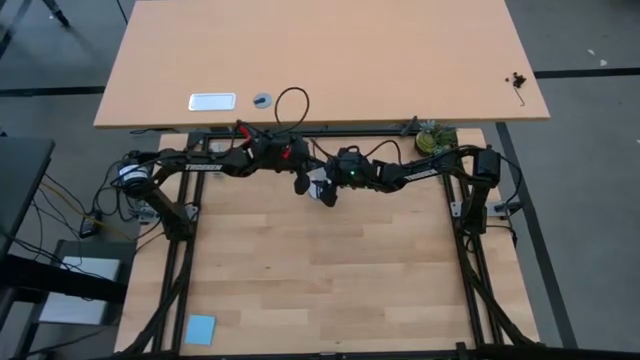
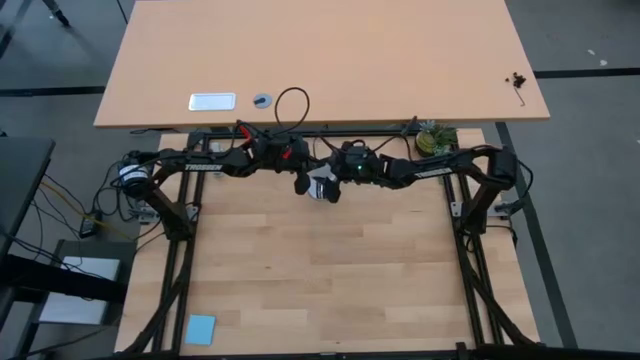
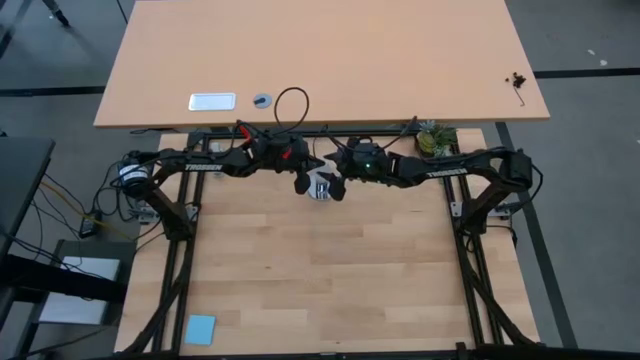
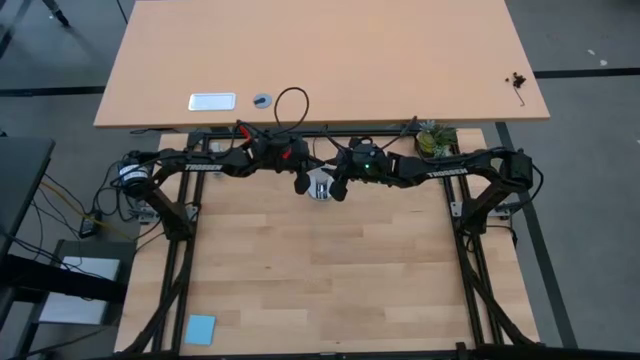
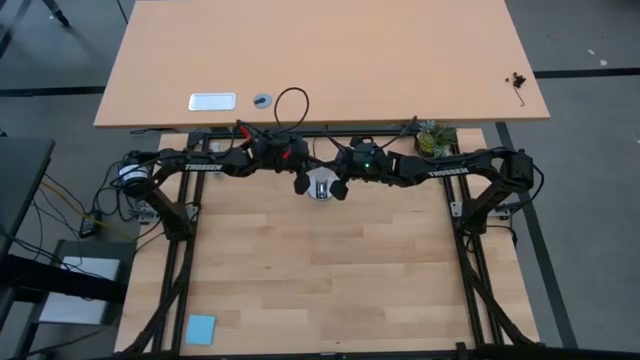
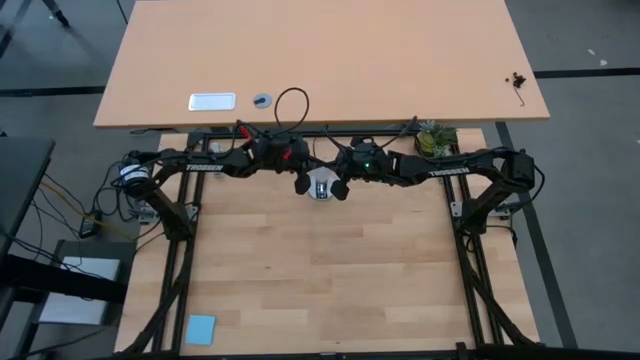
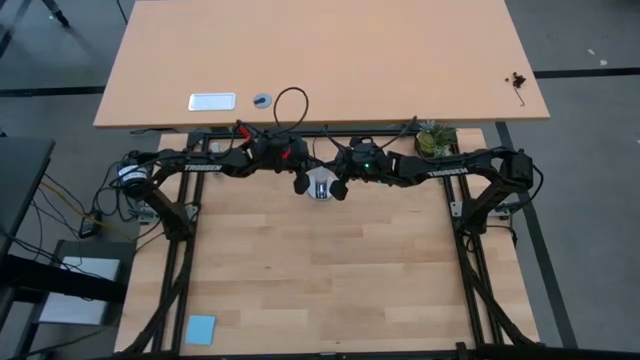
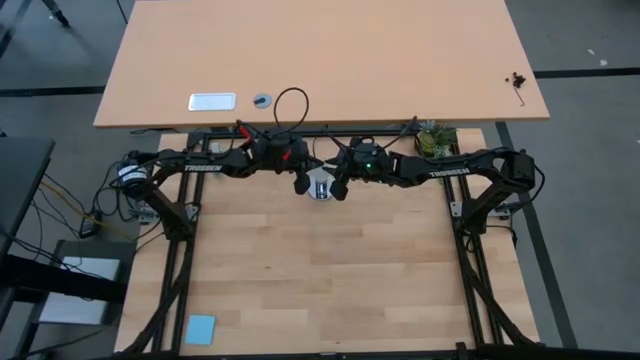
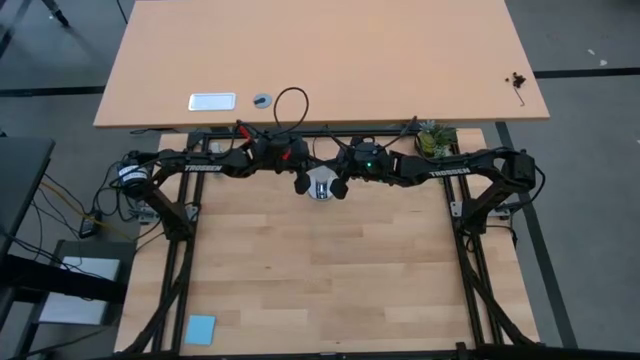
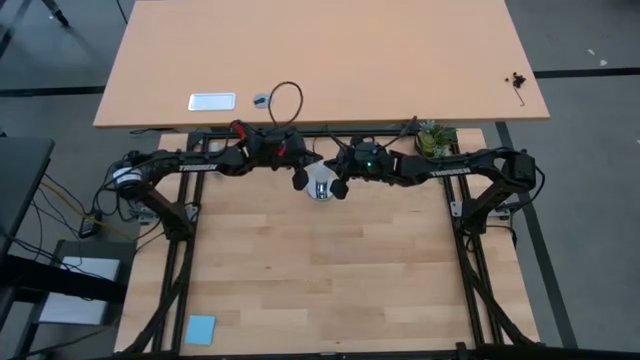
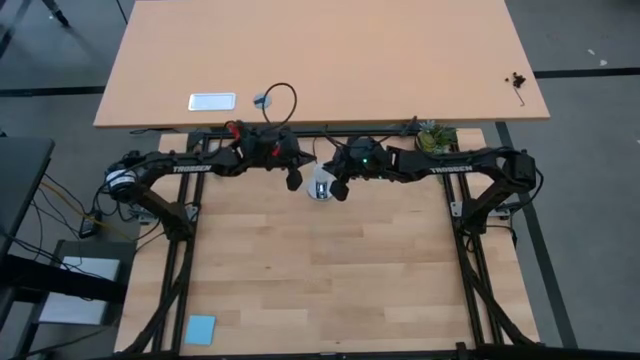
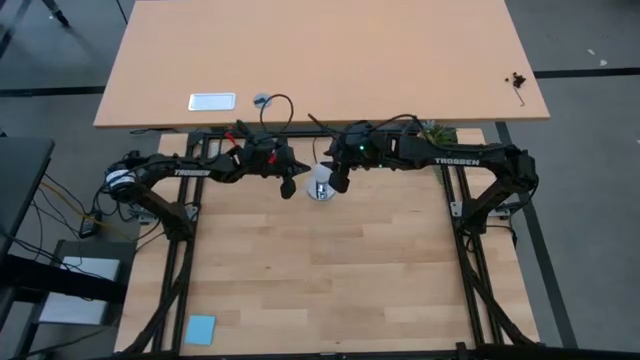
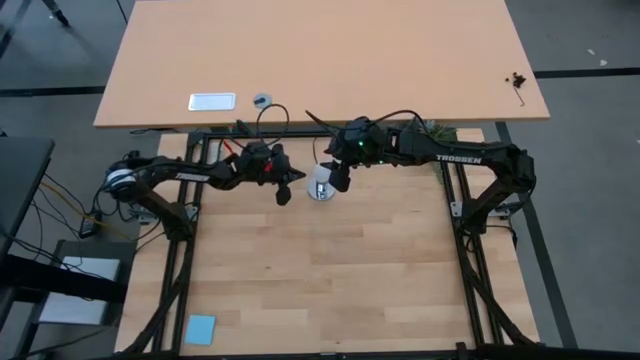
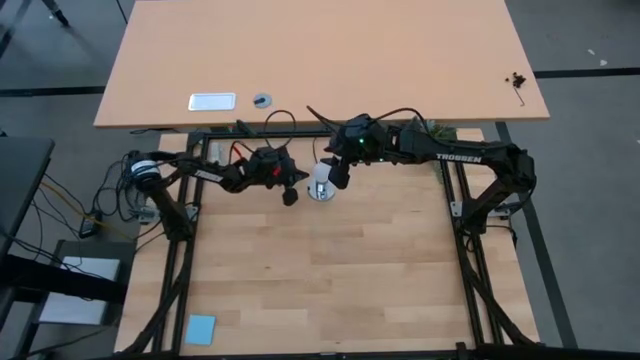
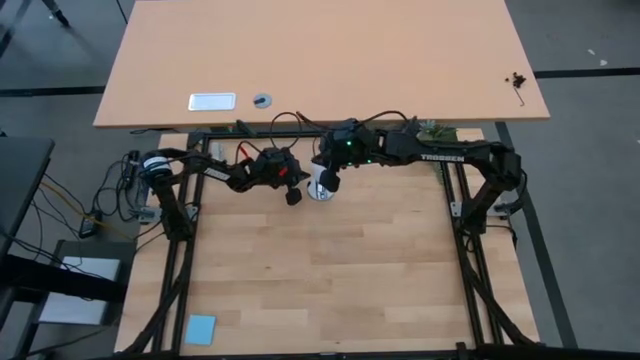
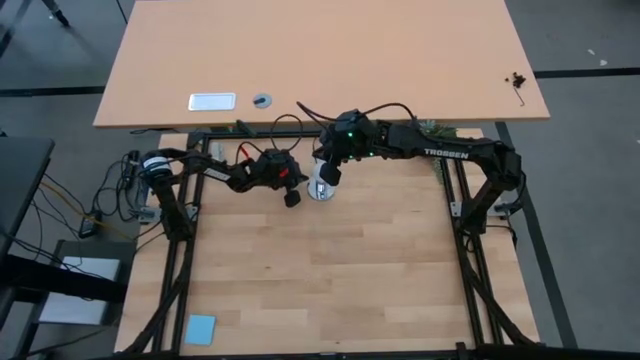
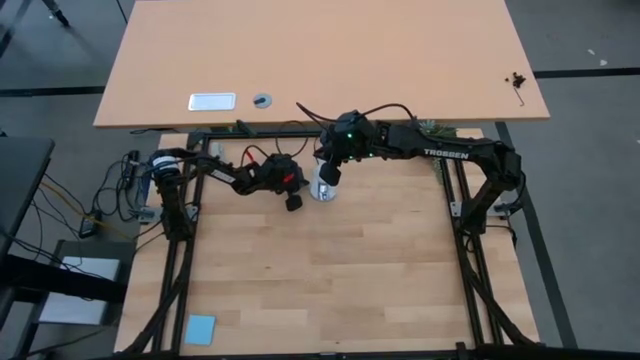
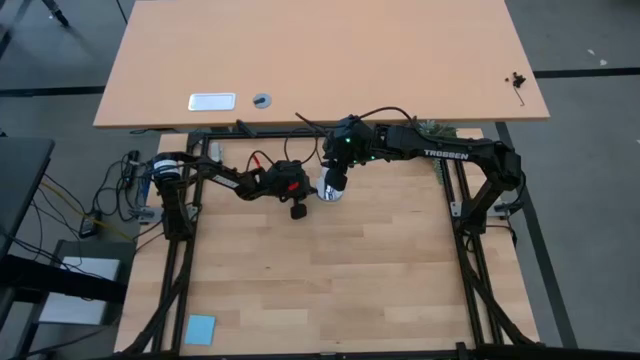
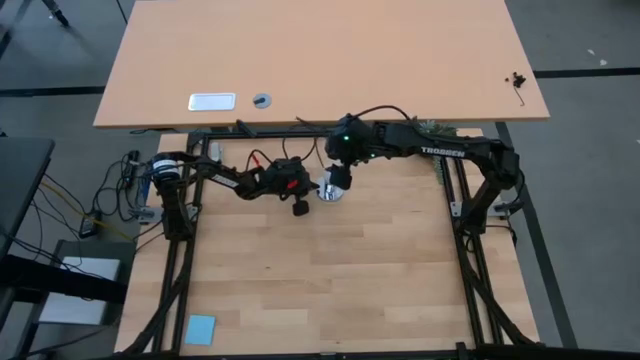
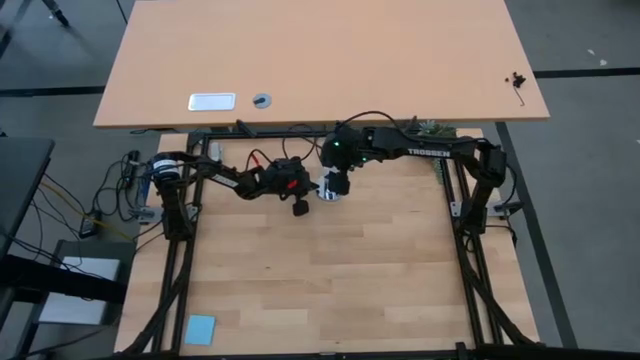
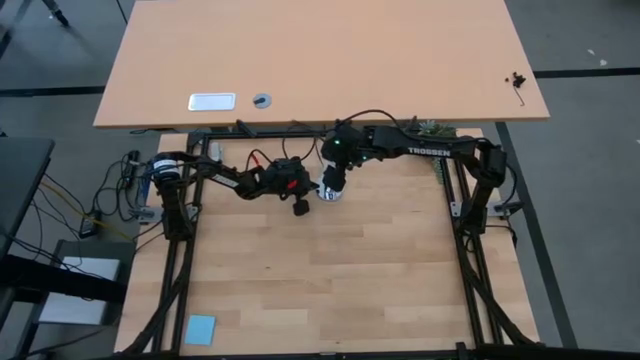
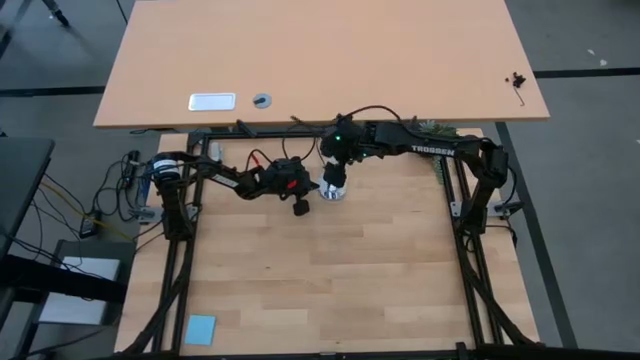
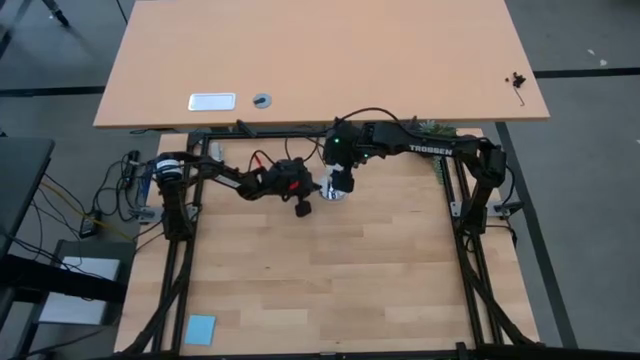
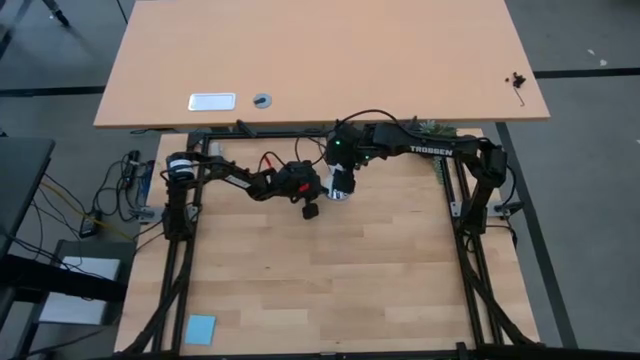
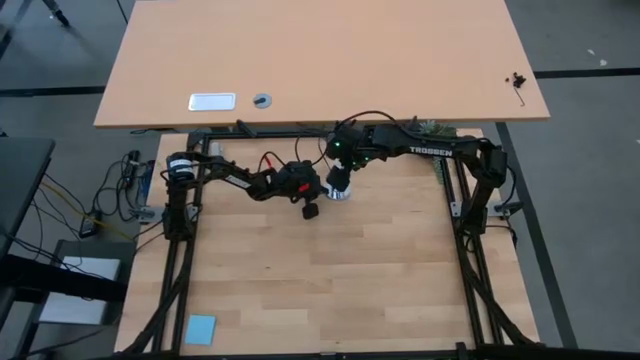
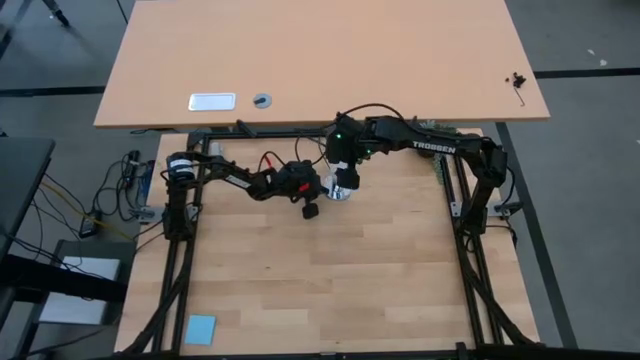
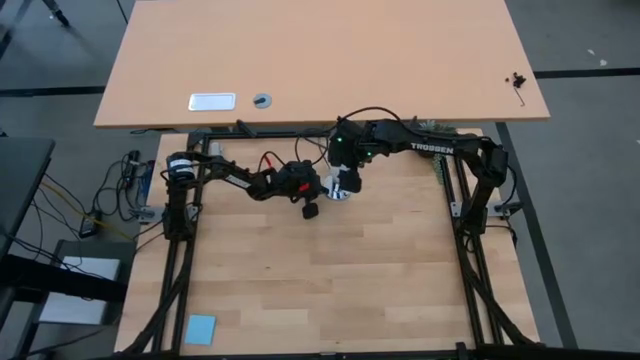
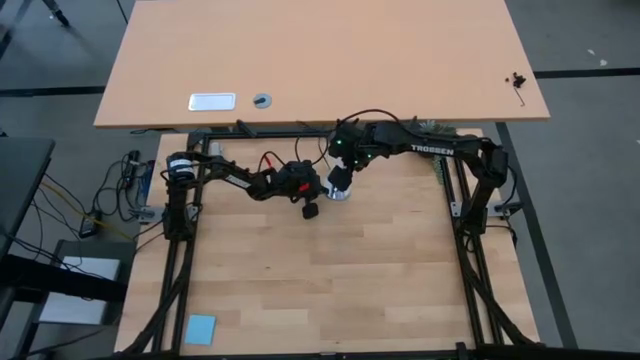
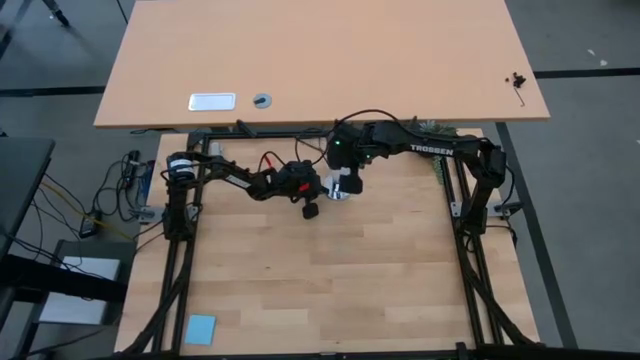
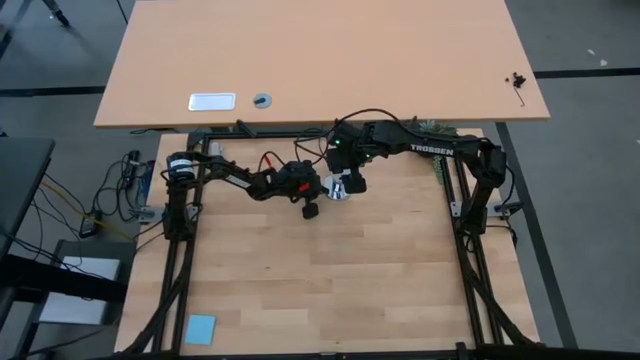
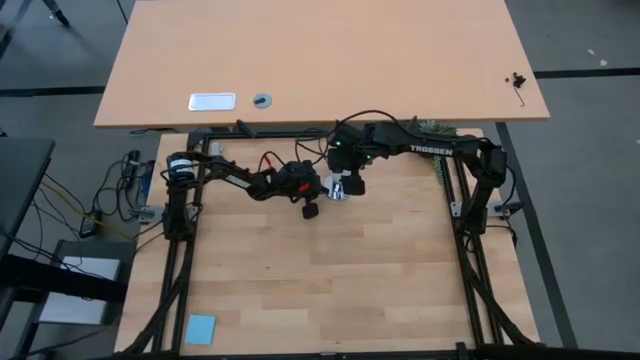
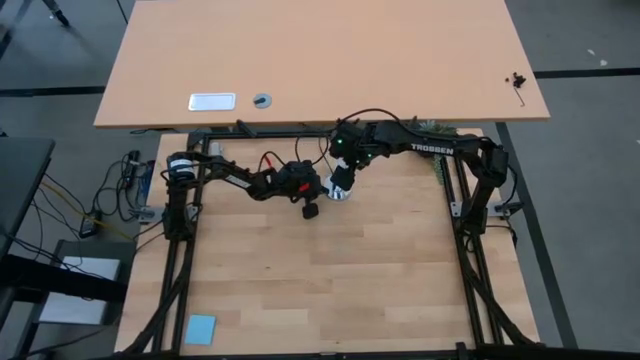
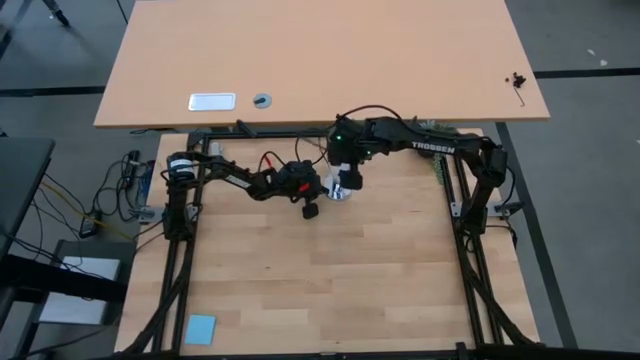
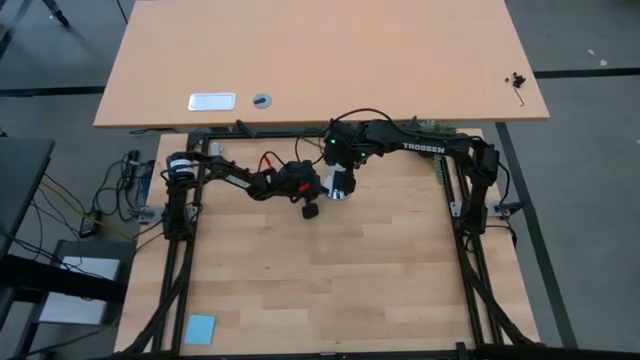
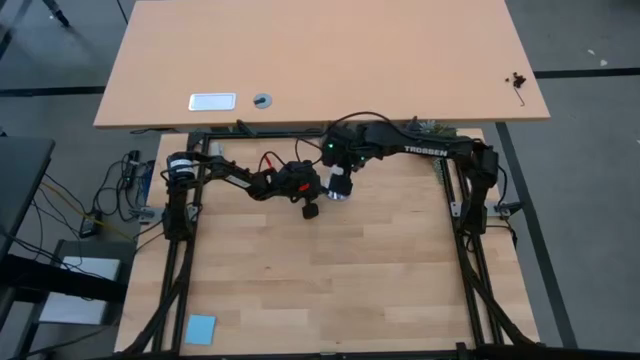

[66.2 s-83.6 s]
Task: Screw lightbulb
Insert the lightbulb into the lamp

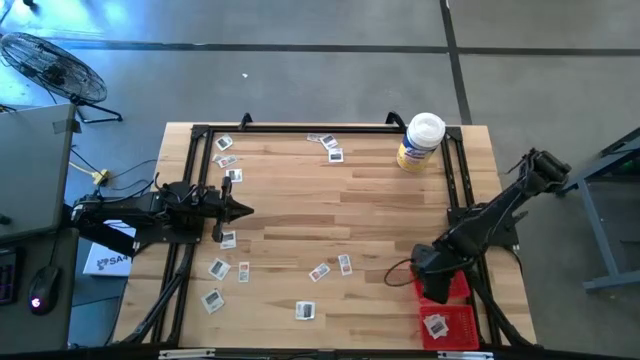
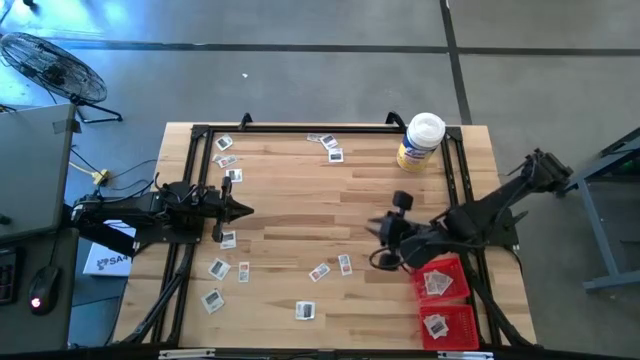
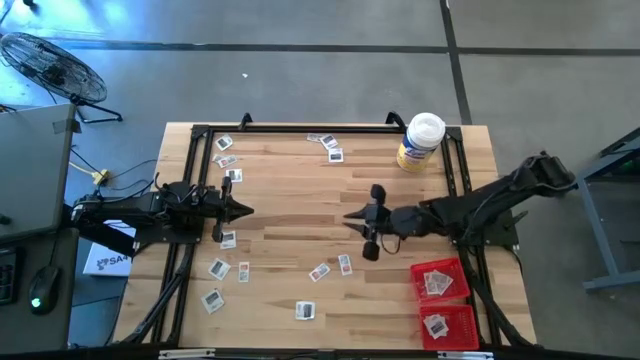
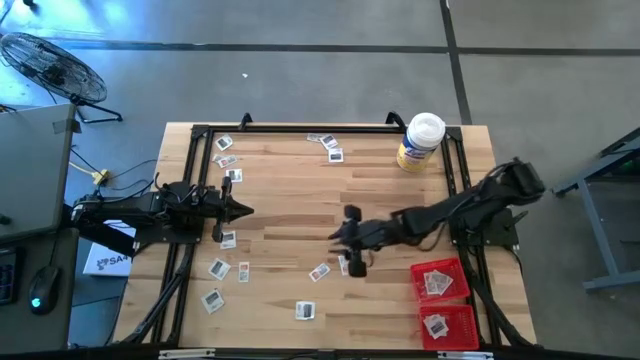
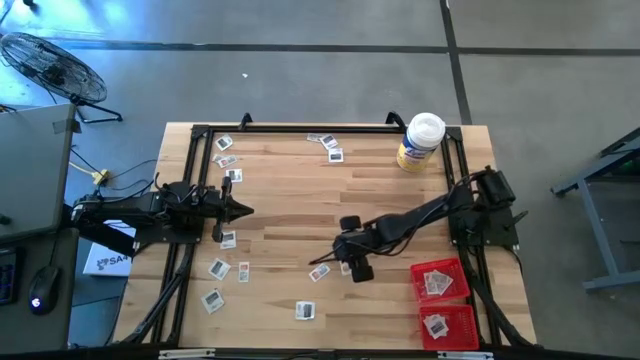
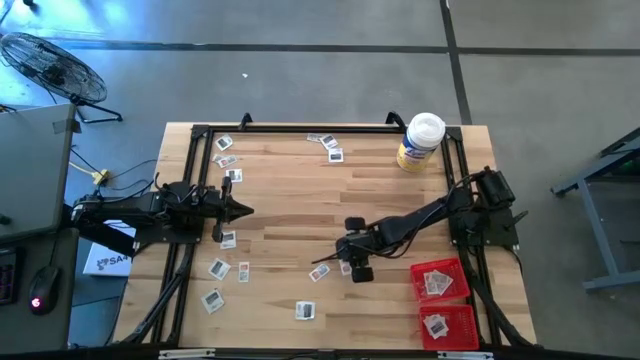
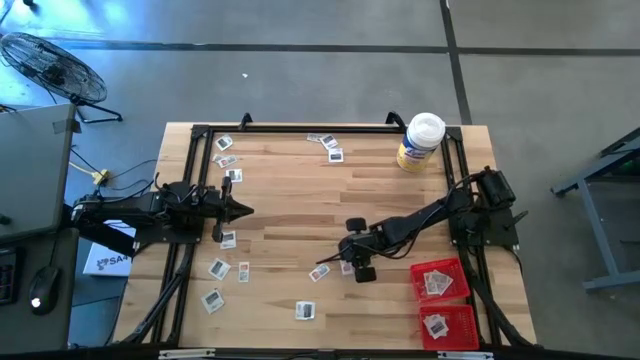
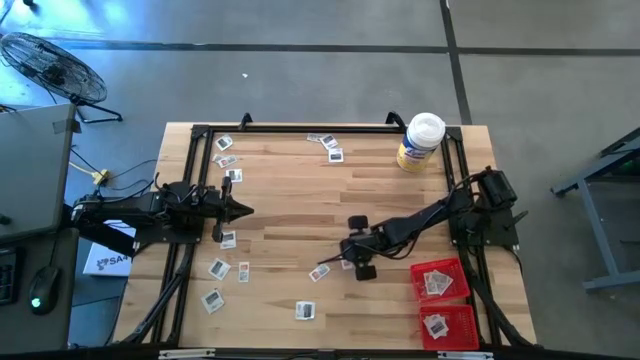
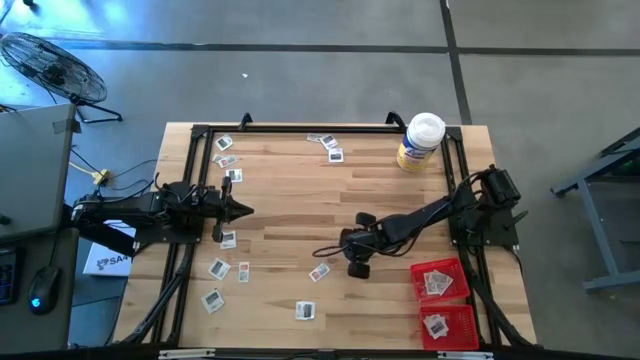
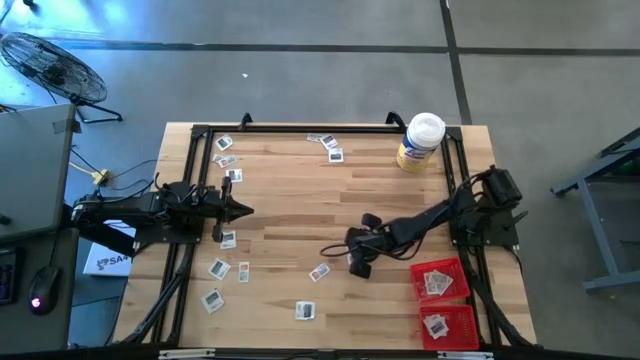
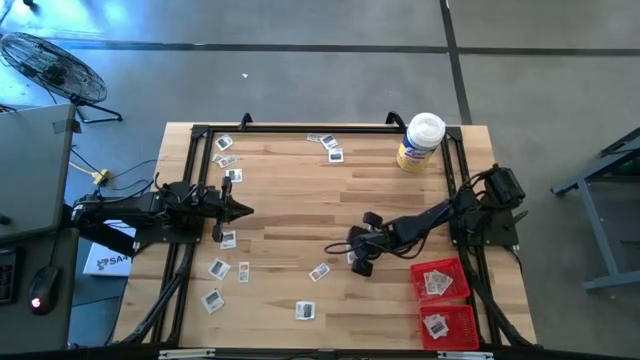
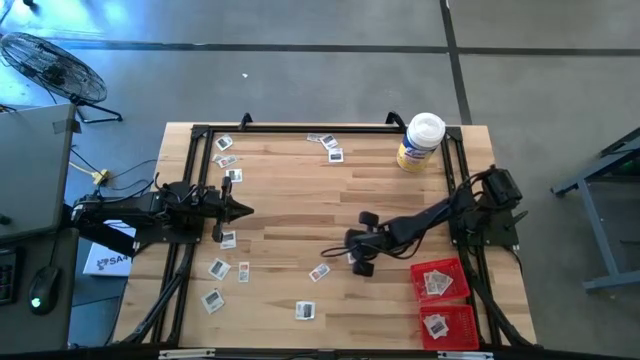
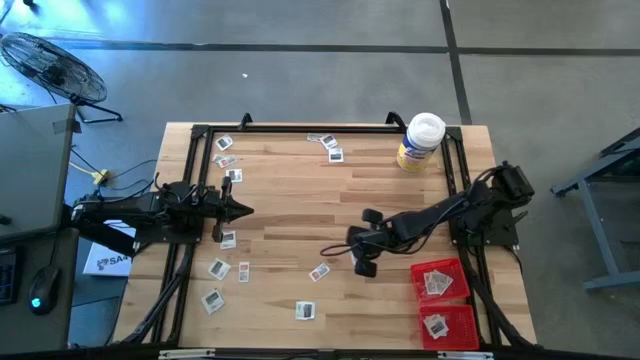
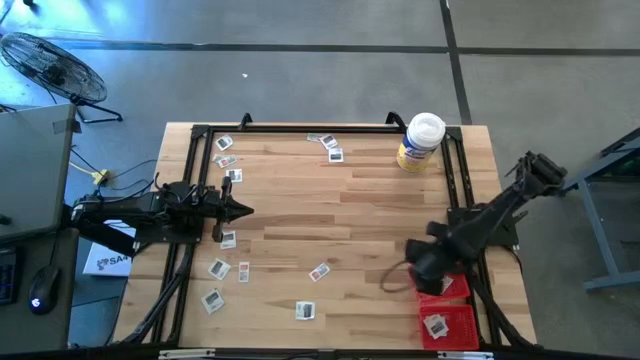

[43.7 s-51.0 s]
Task: Pick & Place First Aid Supplies
Put the white ointment pack into the top red bin
